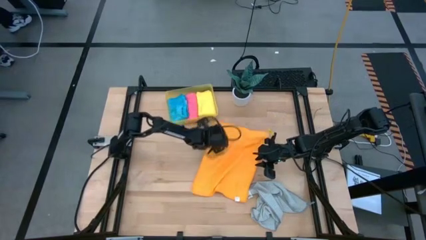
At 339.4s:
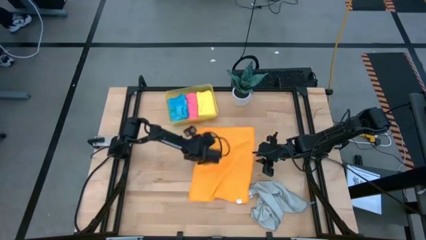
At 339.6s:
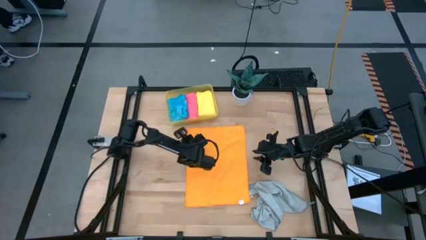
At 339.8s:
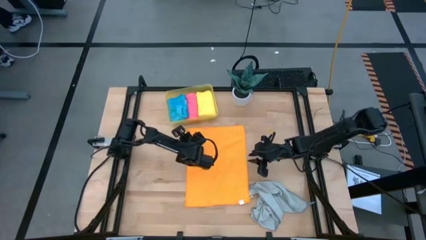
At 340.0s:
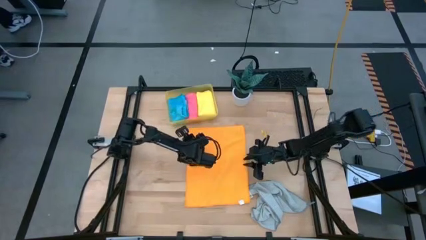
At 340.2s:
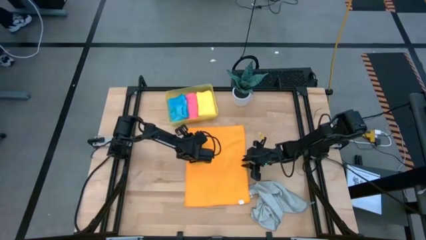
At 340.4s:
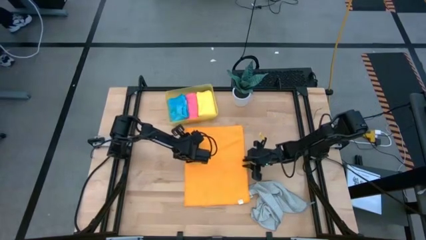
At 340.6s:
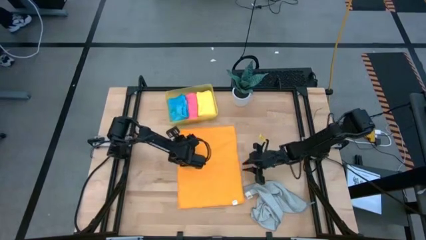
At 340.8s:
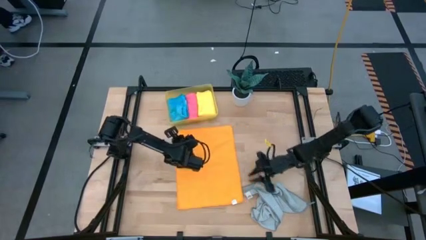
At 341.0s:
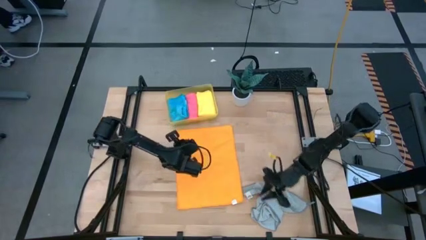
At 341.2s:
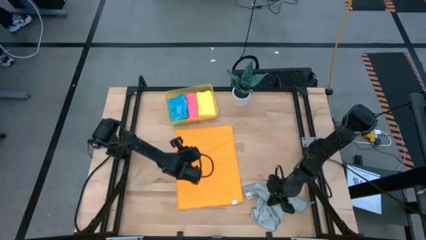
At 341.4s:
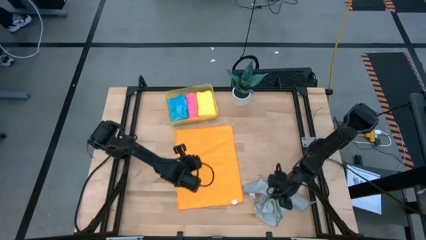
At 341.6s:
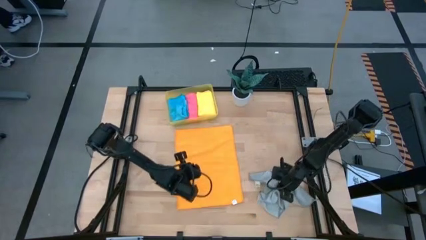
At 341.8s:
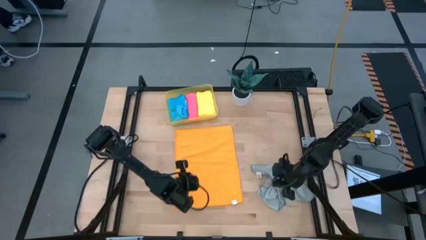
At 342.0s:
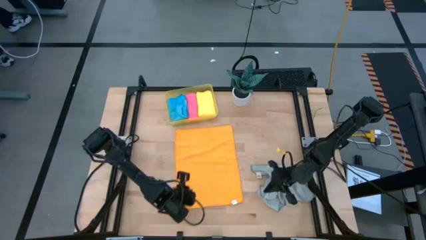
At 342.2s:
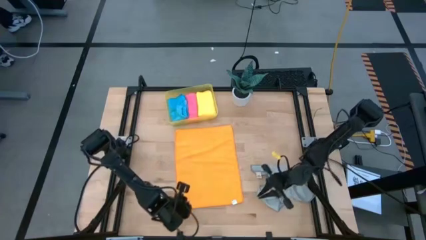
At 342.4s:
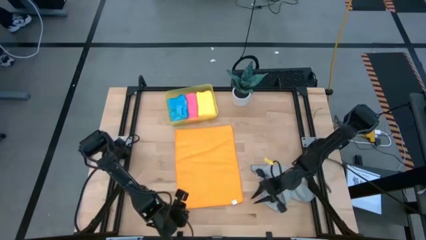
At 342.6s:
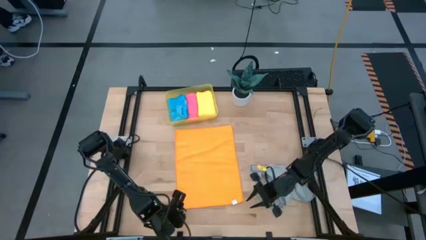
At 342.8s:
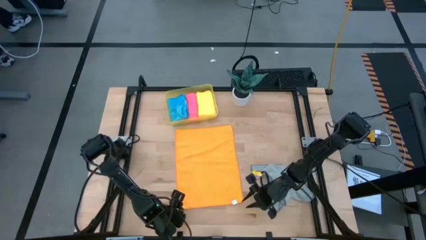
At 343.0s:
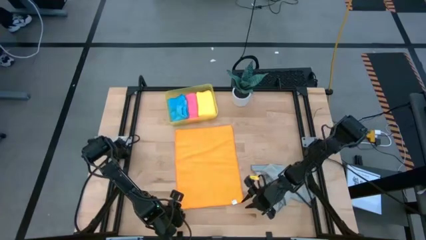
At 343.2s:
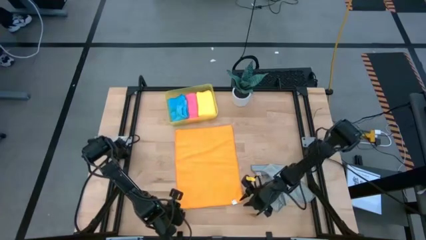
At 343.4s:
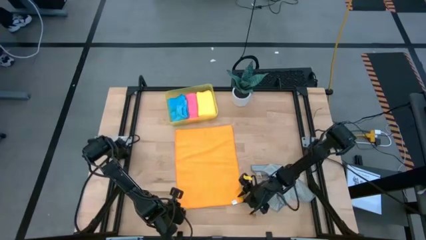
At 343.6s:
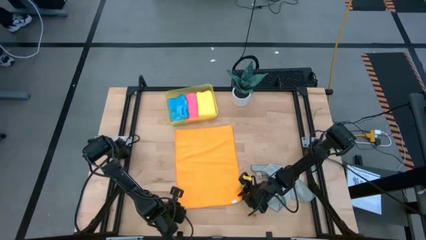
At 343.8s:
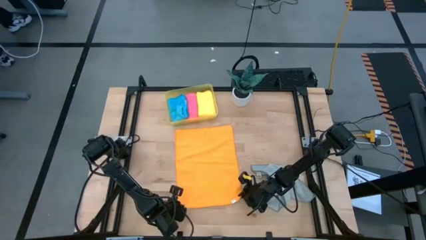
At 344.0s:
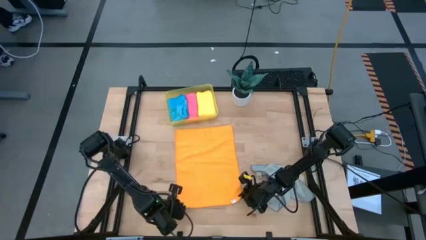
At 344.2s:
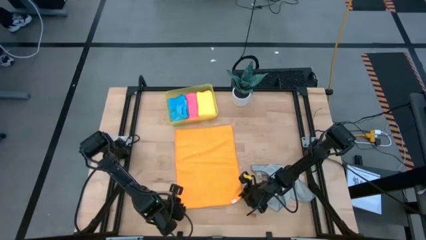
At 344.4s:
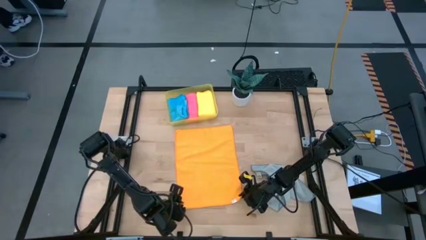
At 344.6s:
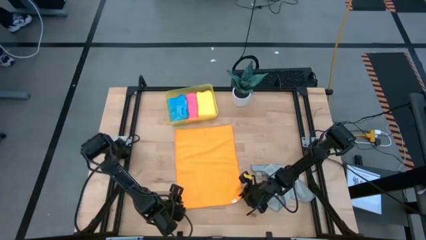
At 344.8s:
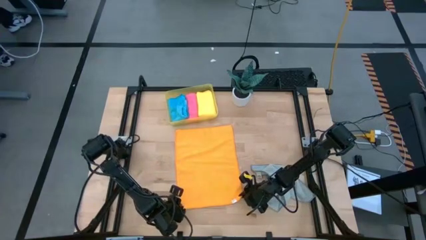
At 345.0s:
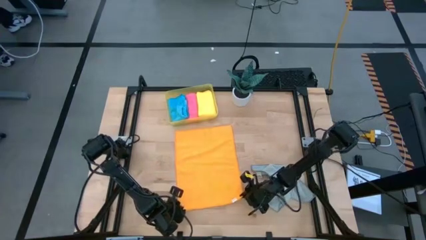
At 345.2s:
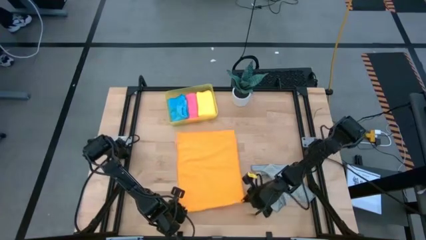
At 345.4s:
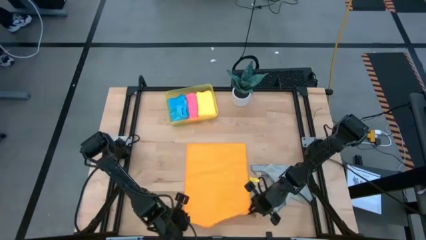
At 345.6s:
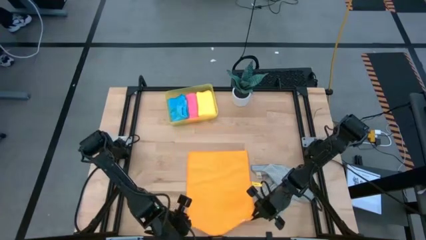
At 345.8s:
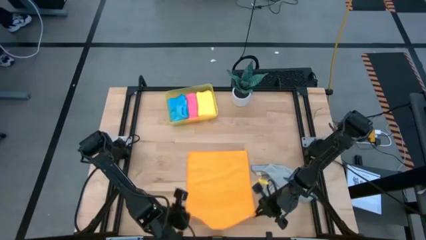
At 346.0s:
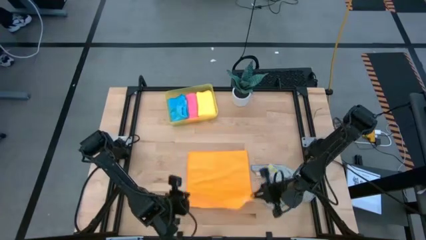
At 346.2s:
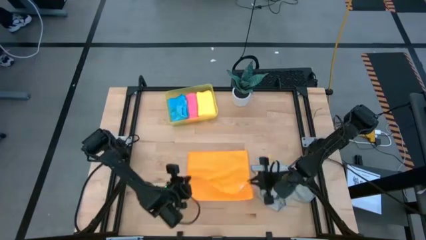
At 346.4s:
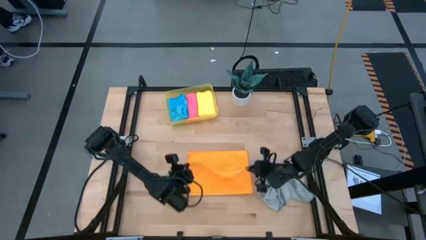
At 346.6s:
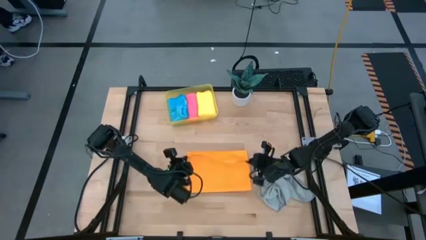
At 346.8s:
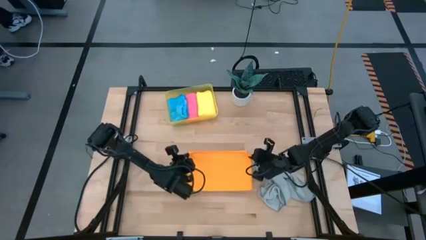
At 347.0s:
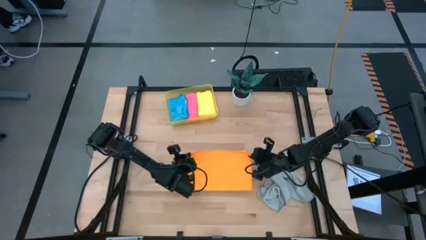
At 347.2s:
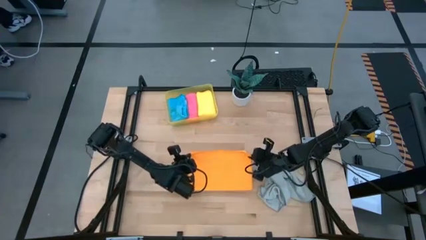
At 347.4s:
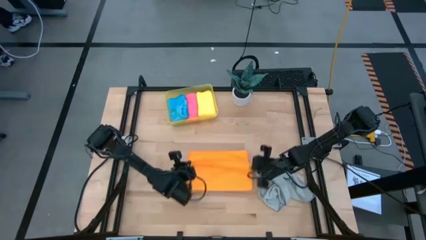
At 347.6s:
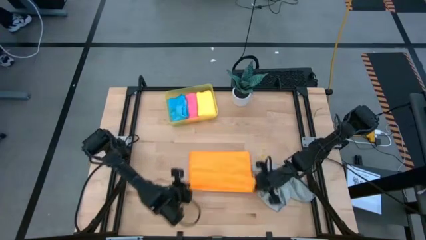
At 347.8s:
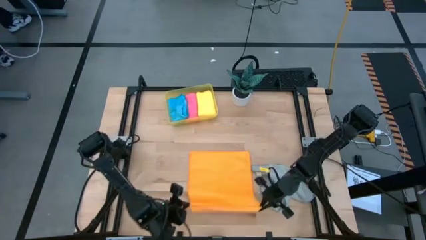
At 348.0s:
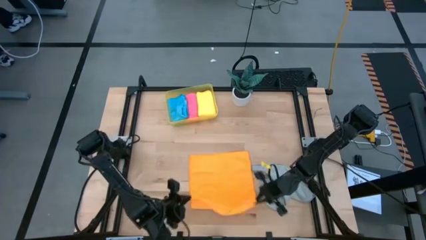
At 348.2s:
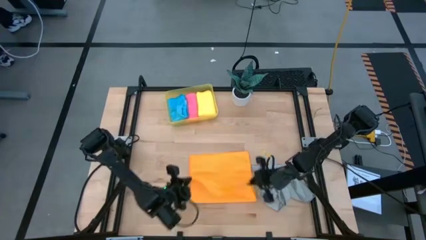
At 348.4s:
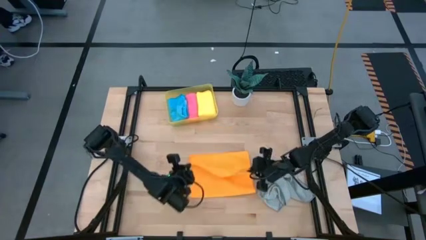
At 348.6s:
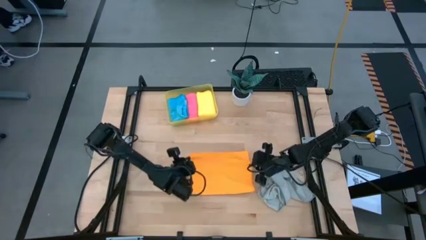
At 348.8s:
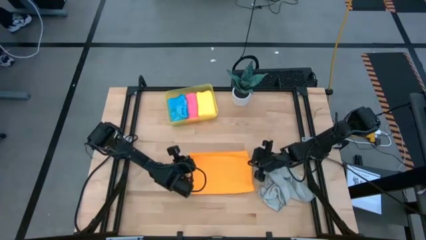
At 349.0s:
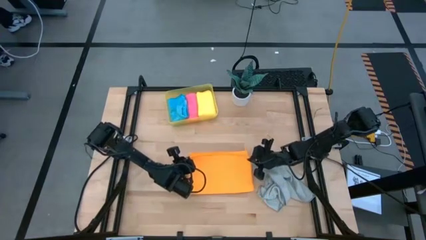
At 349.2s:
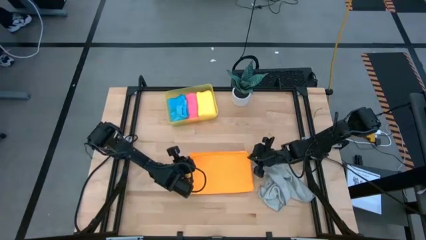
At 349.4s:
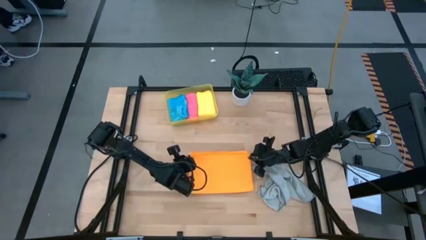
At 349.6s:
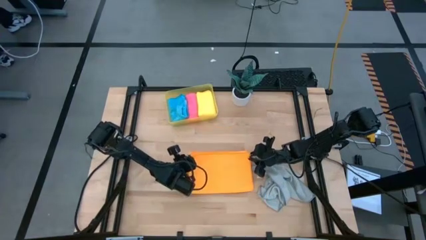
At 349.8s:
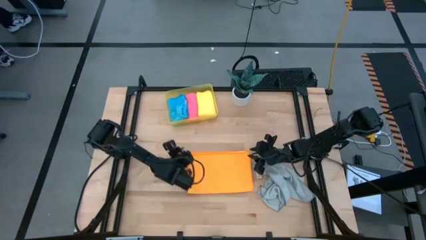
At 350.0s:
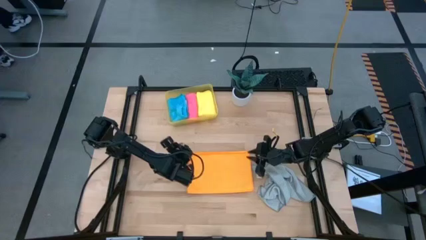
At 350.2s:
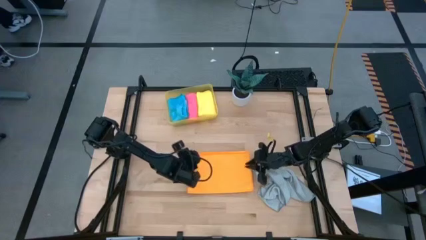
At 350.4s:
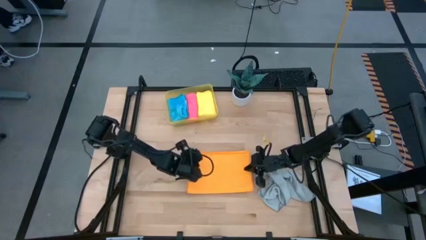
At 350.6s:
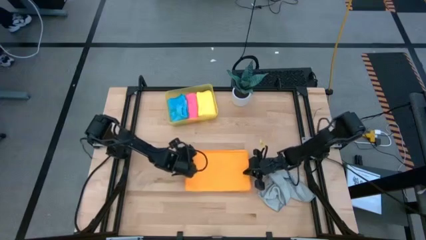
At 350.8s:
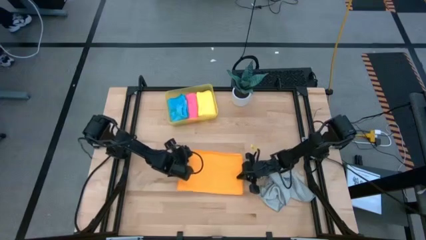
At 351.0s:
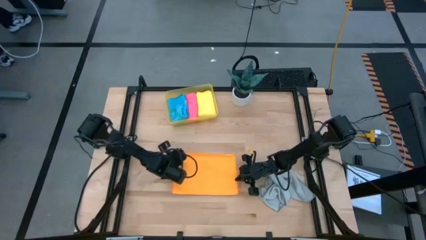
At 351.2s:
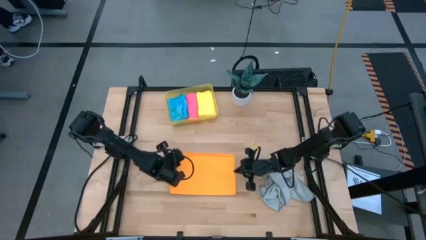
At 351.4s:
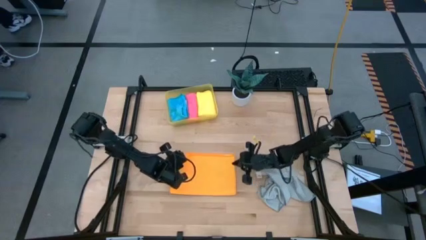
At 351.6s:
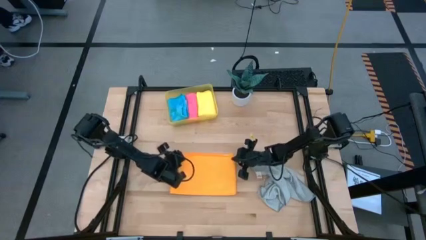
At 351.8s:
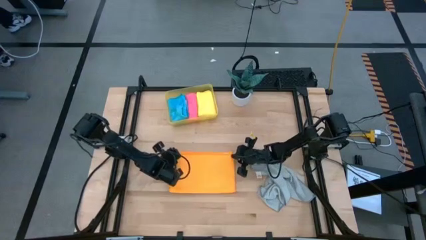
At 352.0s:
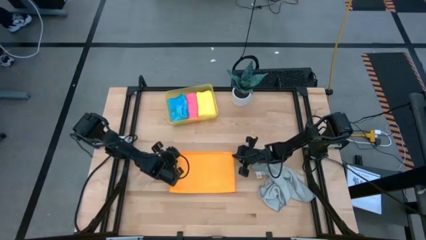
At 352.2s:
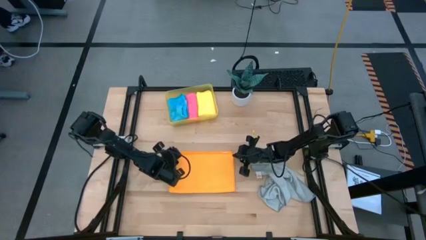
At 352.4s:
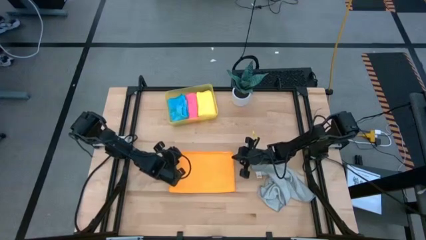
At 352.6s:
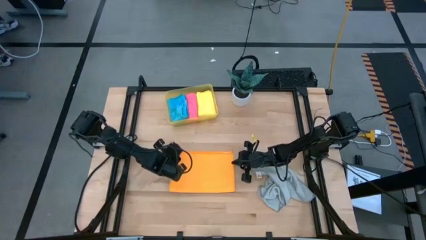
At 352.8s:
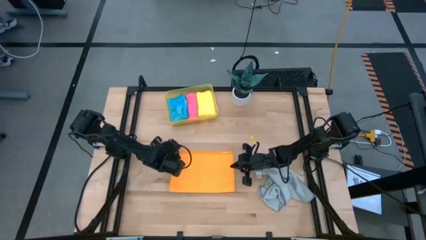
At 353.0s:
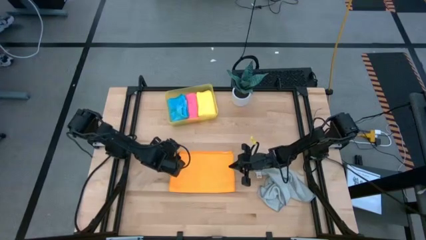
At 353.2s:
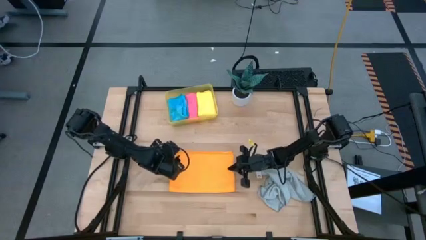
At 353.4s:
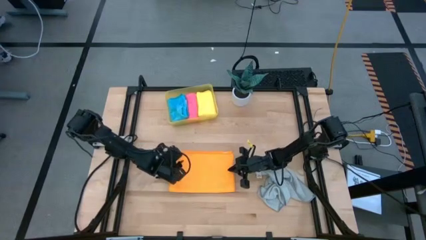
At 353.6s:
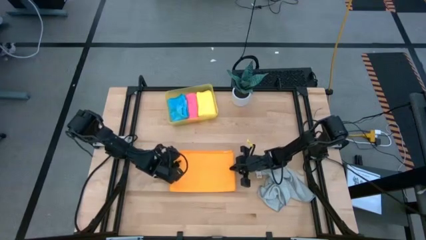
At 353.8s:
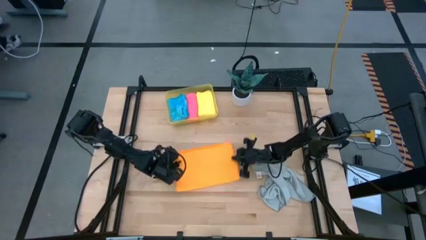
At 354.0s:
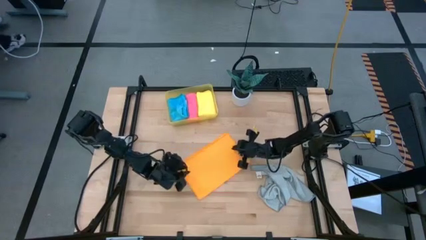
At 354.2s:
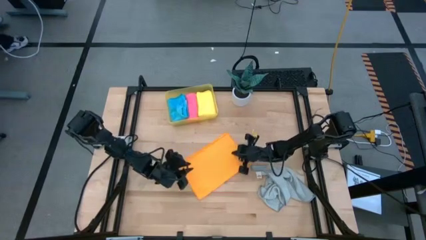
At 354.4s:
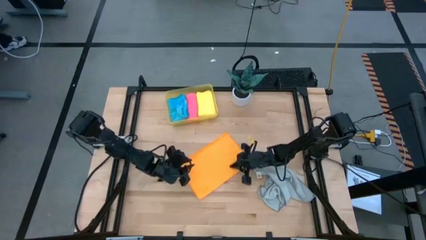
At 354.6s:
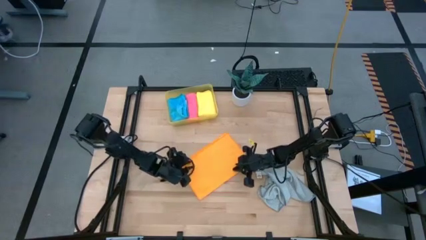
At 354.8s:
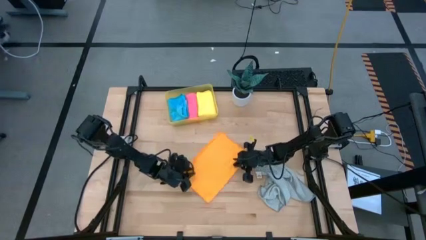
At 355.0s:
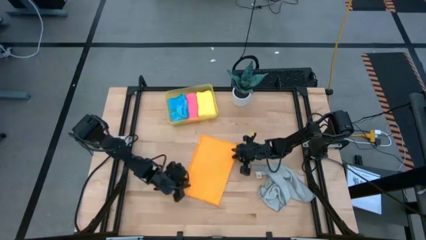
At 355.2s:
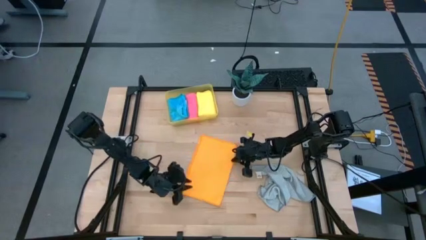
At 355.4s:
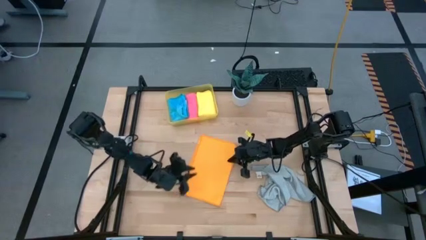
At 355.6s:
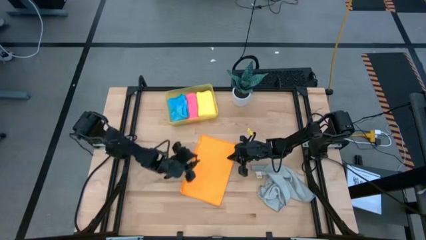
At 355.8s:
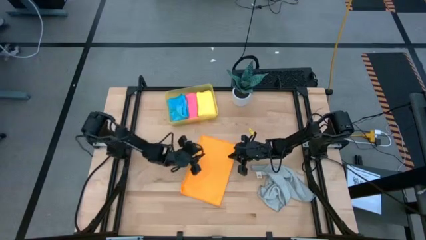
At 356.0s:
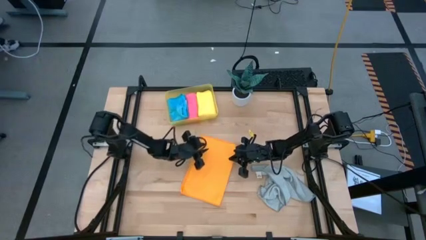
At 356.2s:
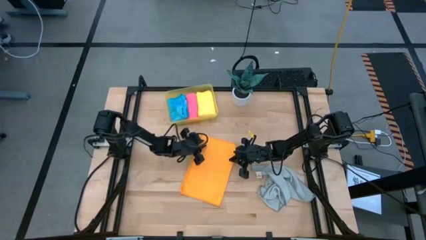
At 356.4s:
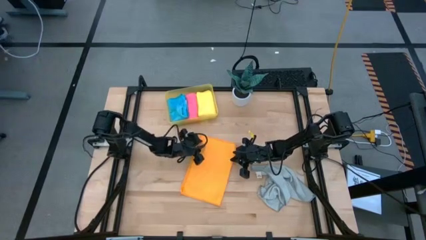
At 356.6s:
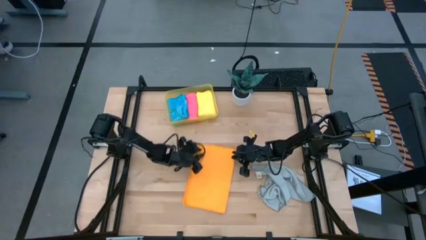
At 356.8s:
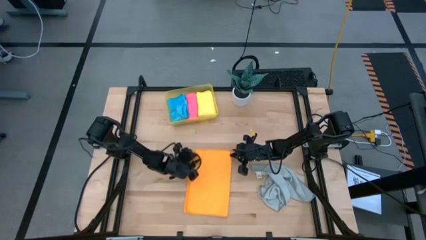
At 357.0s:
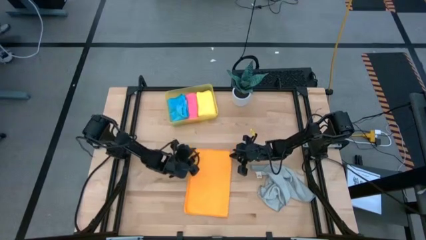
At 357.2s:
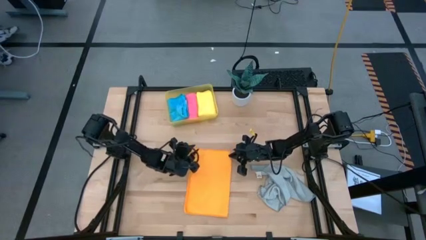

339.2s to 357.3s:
Task: Fold microfiber towels
Fold the orange microfiber cloth
